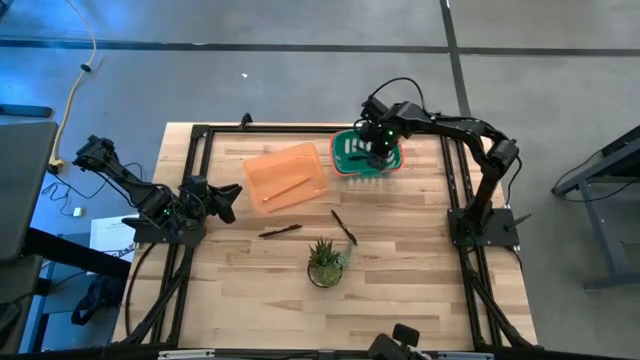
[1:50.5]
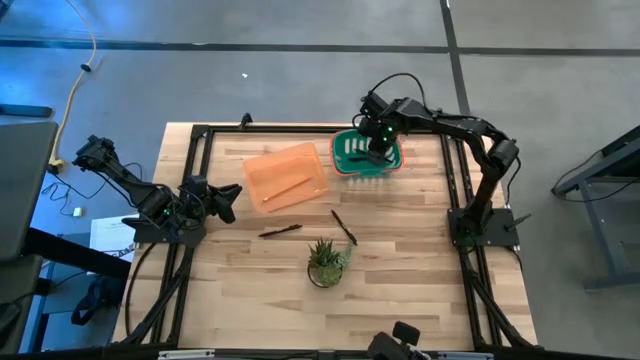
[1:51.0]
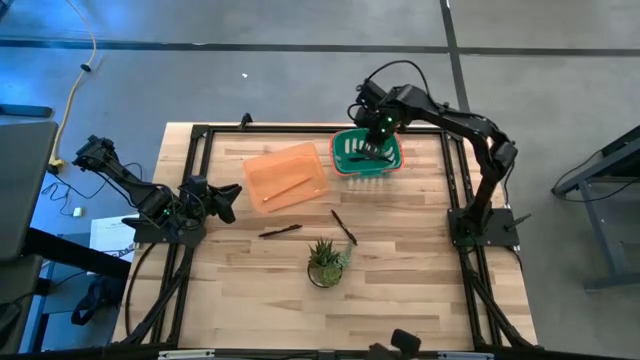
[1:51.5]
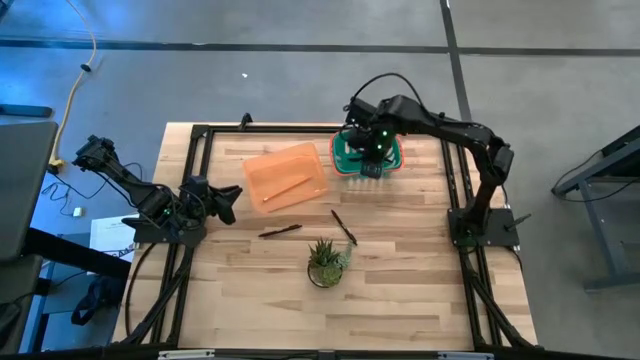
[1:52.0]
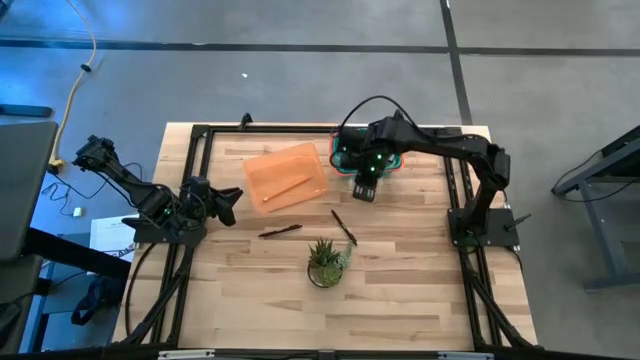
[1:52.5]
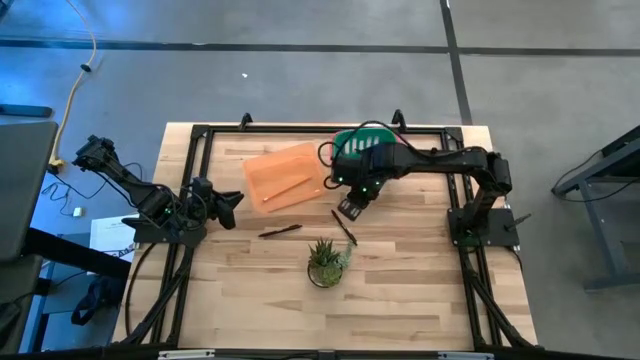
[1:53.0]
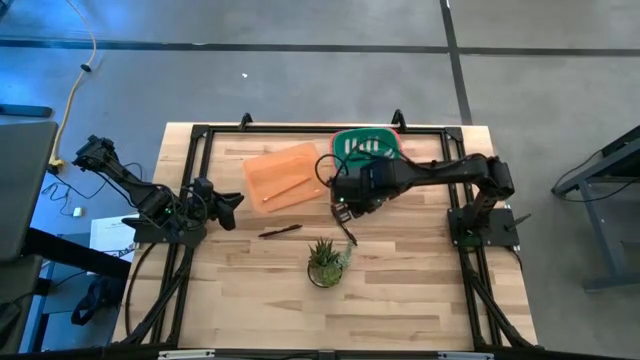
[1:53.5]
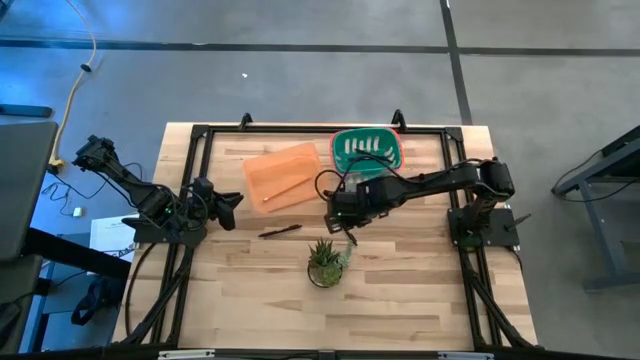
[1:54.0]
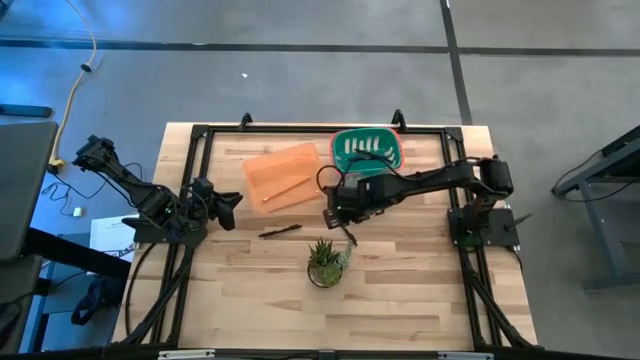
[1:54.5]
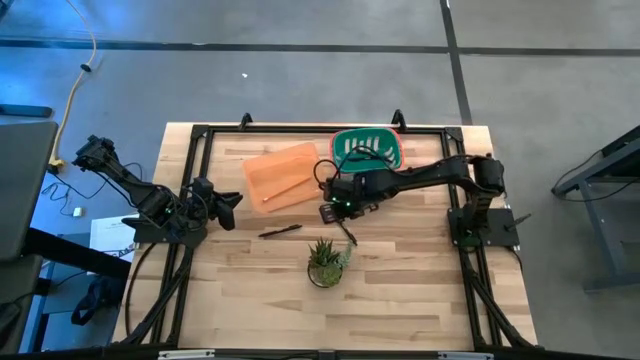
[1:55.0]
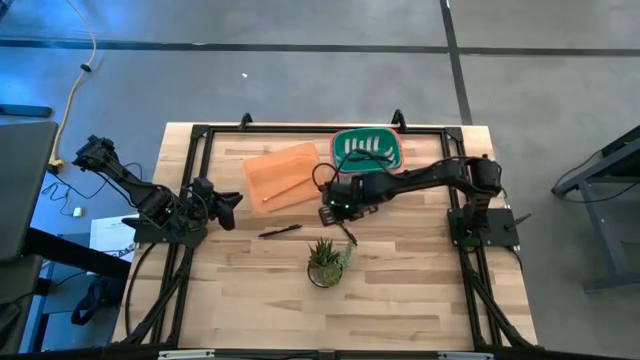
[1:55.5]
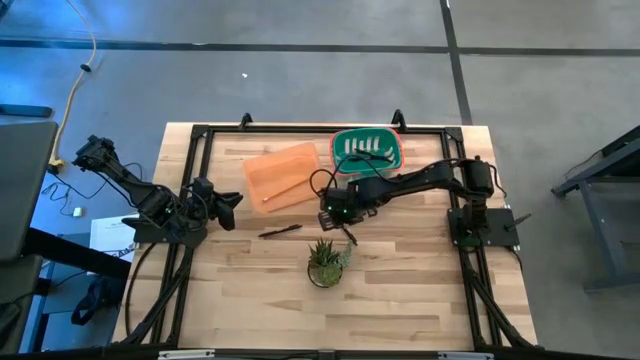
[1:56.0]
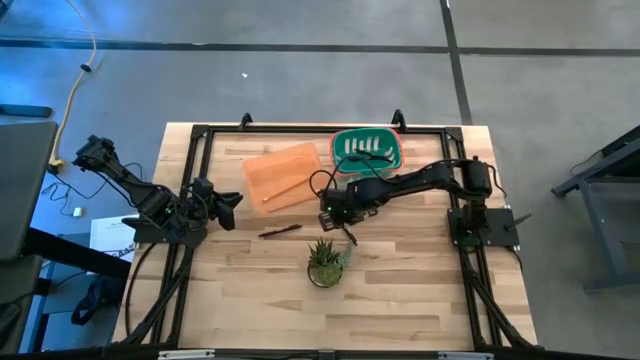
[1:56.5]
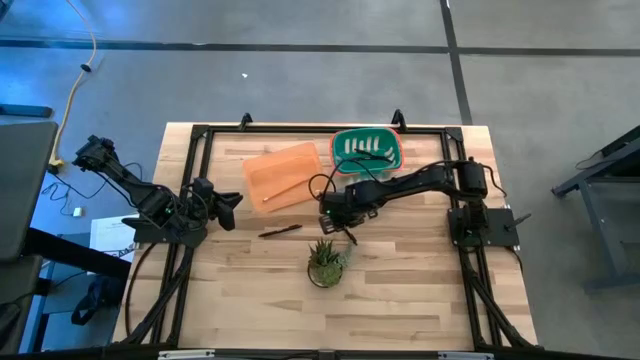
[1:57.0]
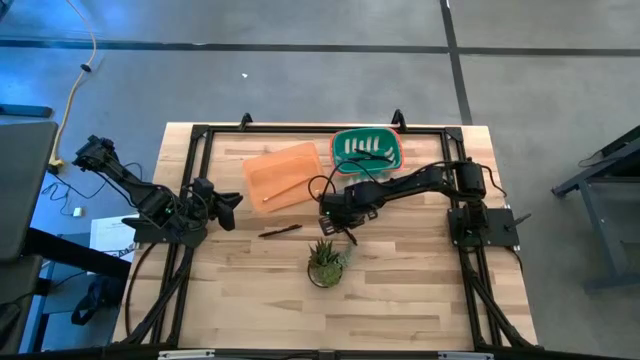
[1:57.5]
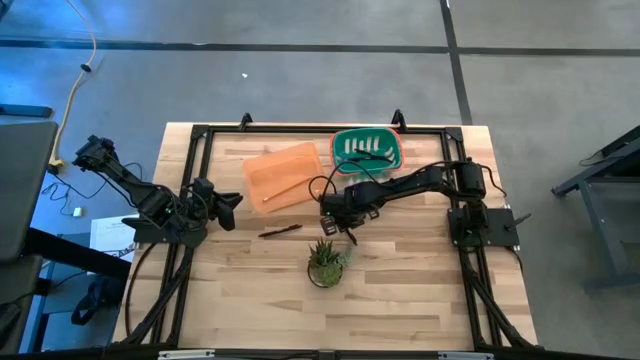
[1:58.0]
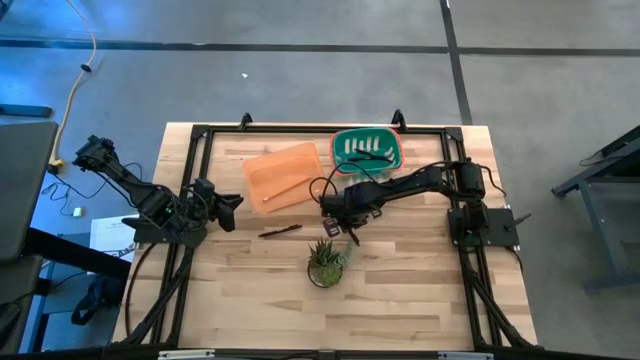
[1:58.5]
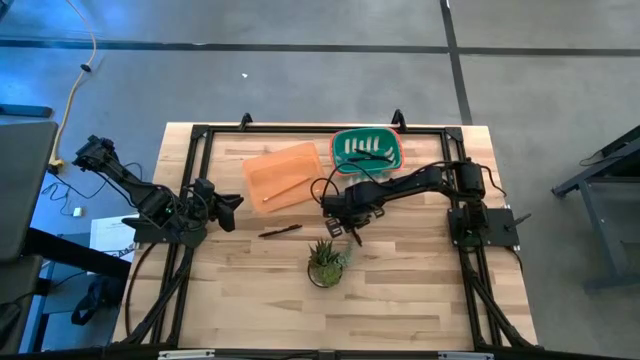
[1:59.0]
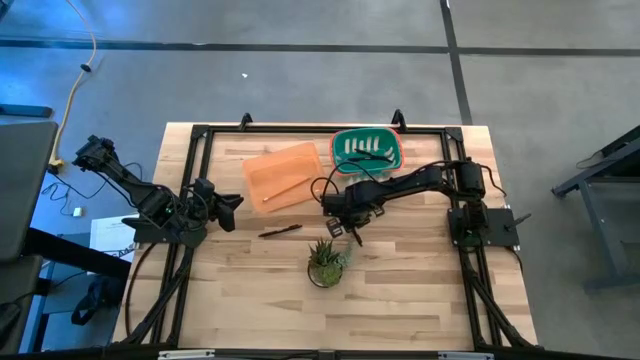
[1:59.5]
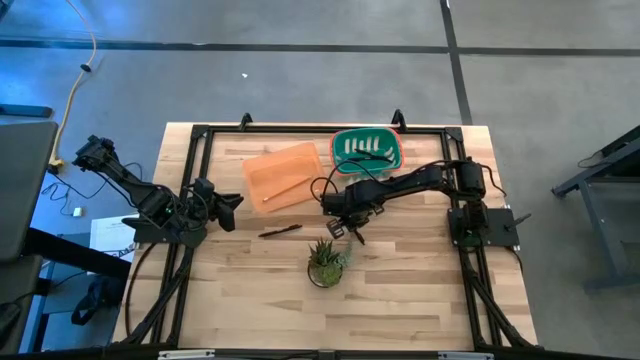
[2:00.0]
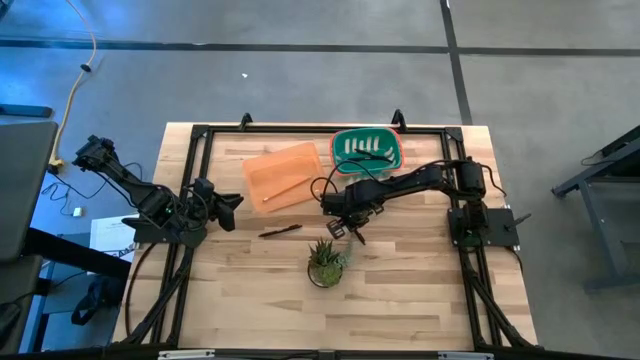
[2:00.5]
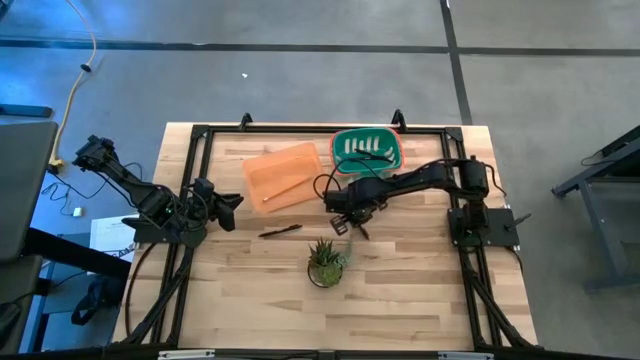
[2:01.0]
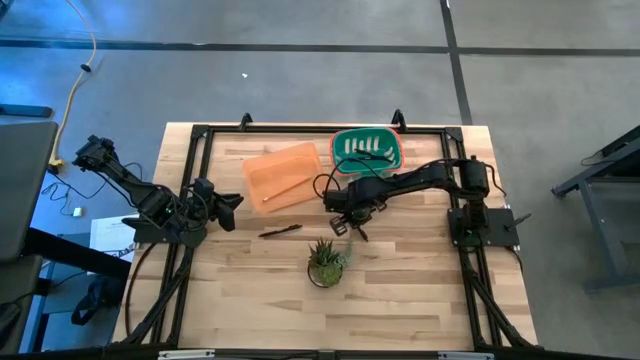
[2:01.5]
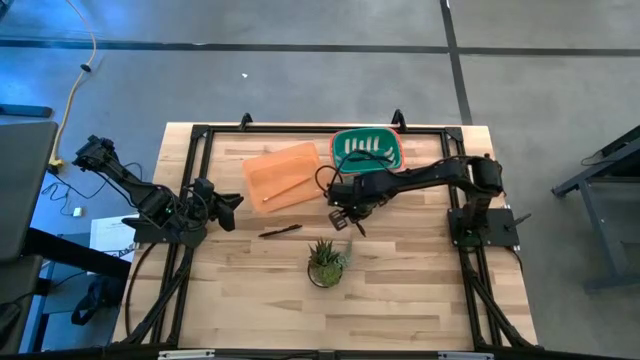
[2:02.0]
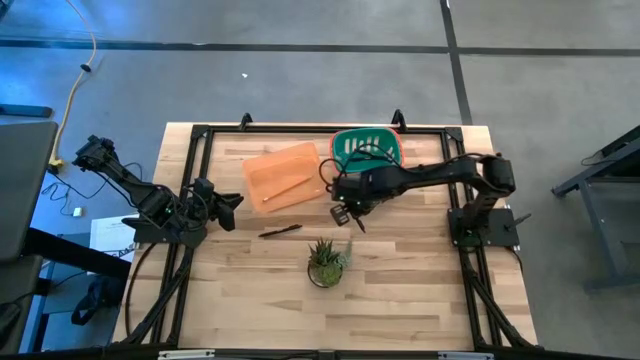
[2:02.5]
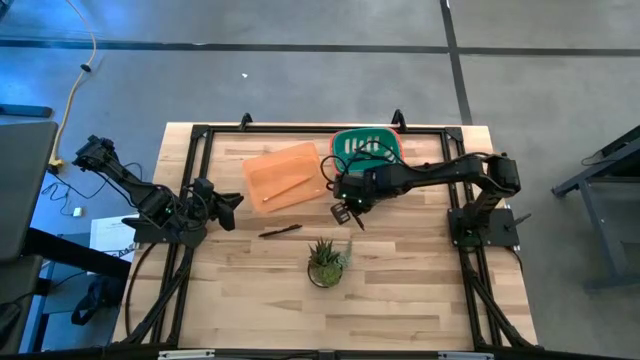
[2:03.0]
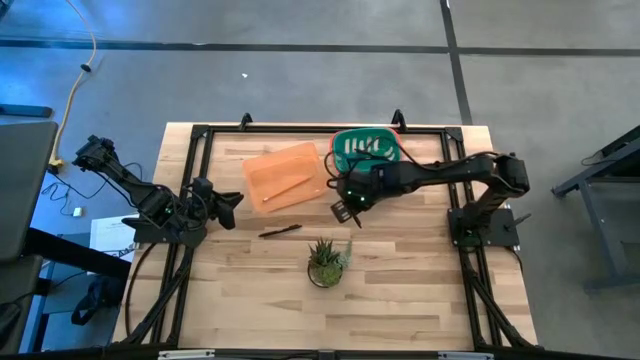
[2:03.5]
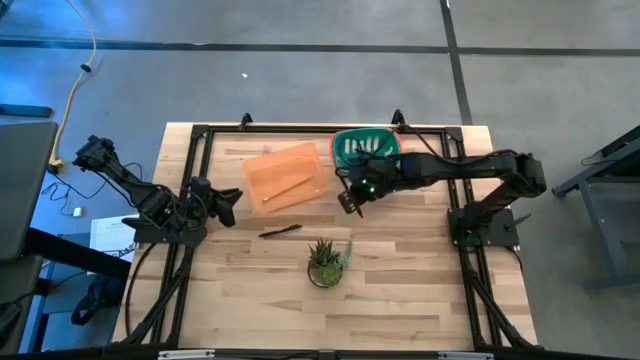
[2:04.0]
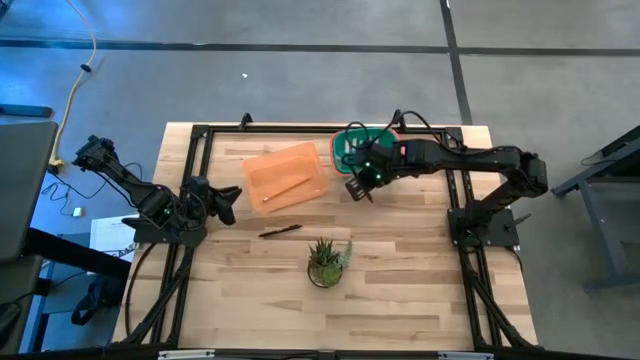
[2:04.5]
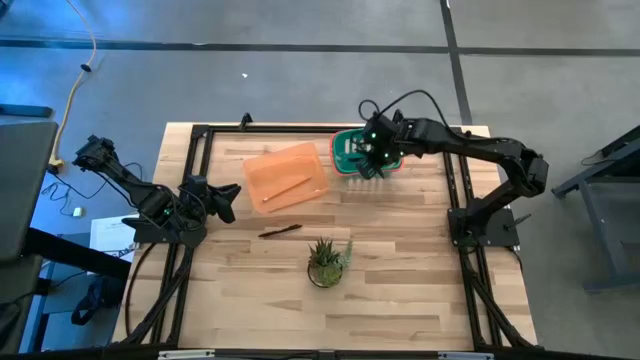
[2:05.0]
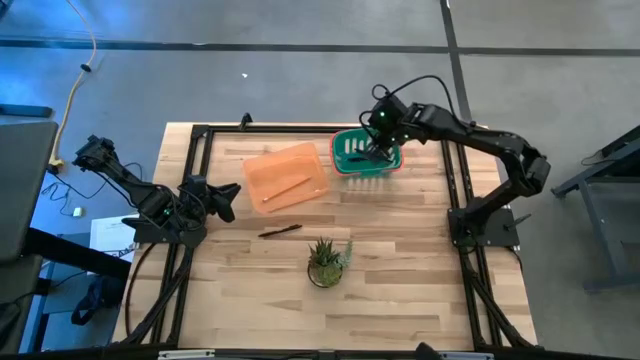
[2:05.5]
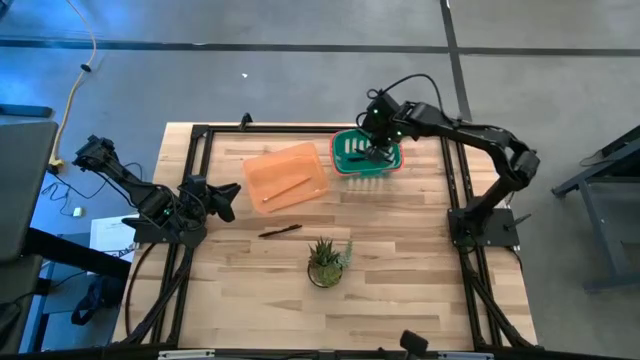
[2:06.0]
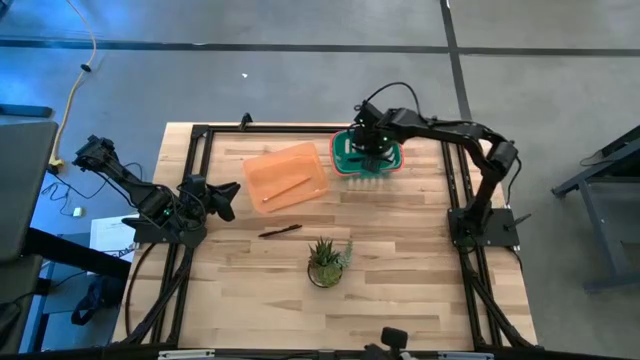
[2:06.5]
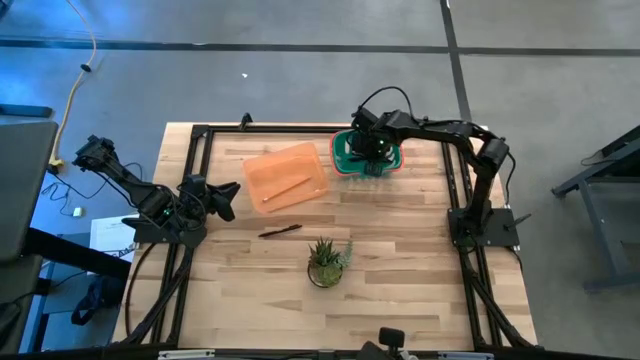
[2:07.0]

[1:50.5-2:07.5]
Task: Sort pens & pencils
Put the black pen into the green basket

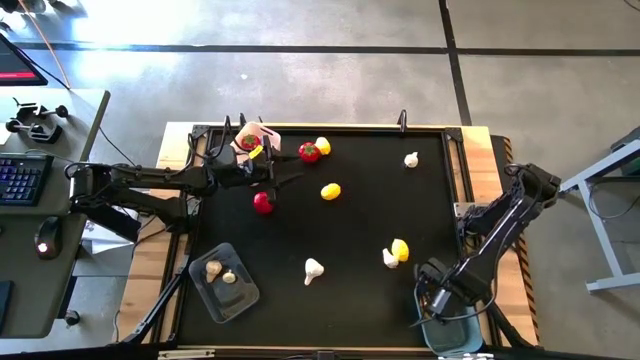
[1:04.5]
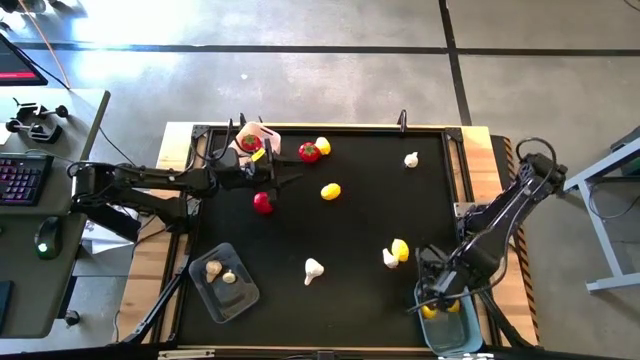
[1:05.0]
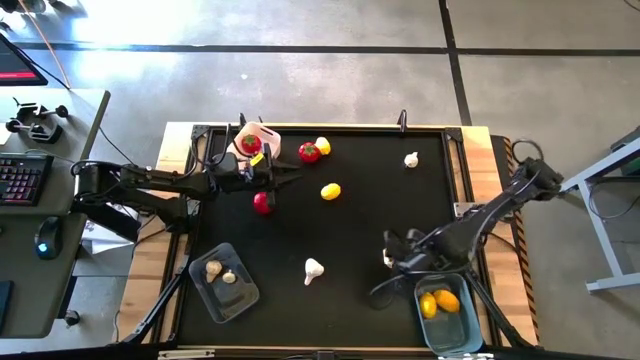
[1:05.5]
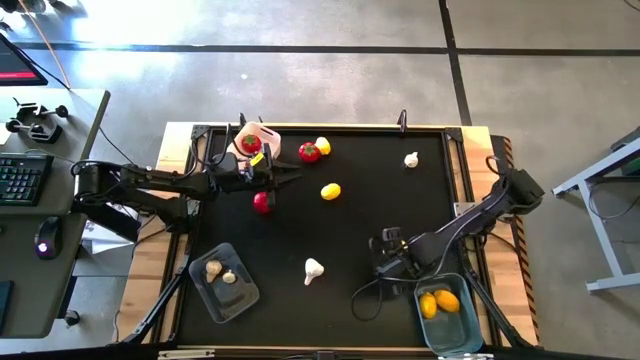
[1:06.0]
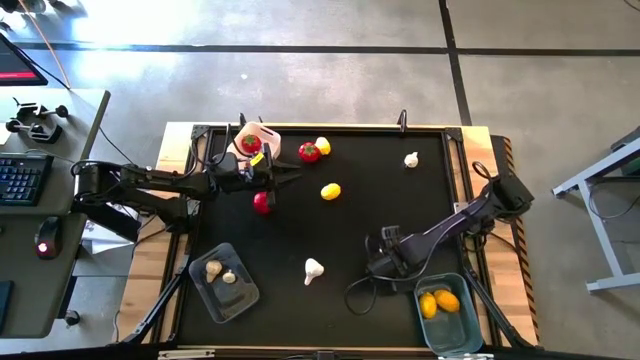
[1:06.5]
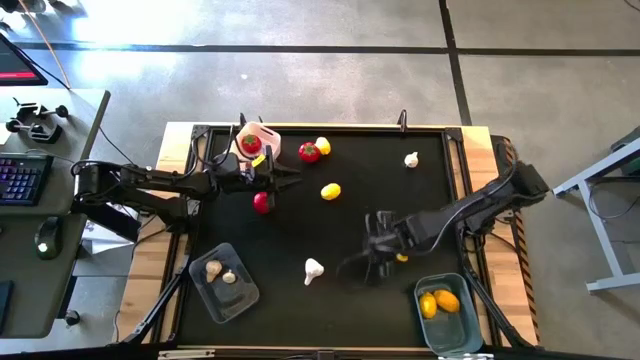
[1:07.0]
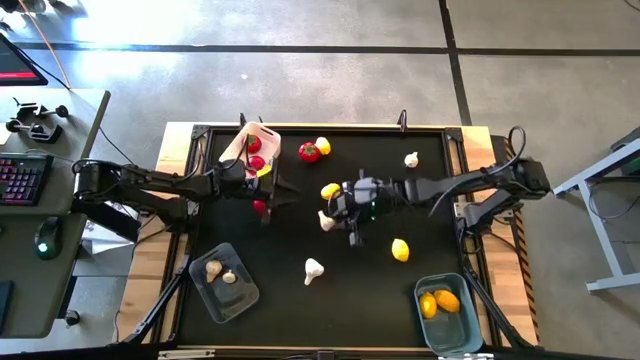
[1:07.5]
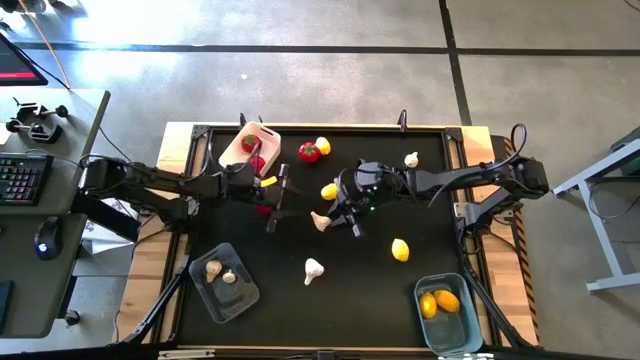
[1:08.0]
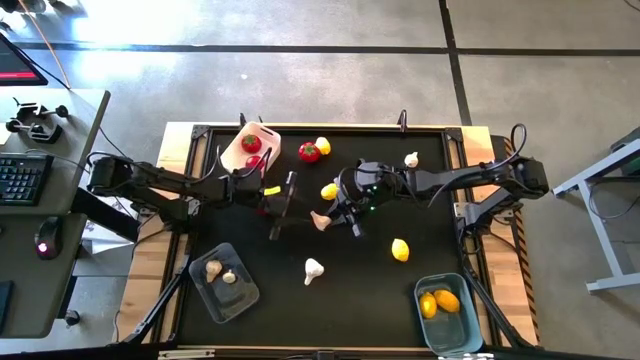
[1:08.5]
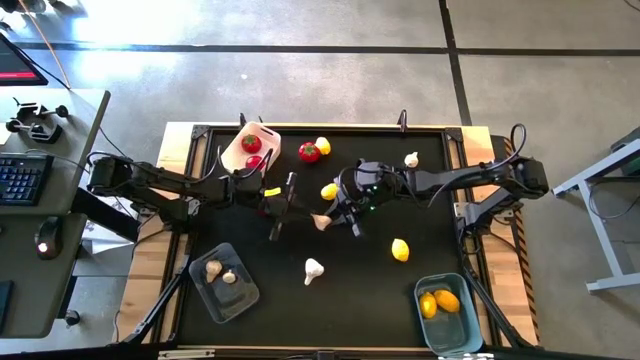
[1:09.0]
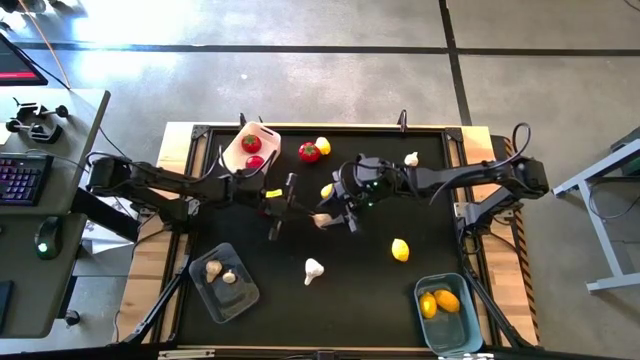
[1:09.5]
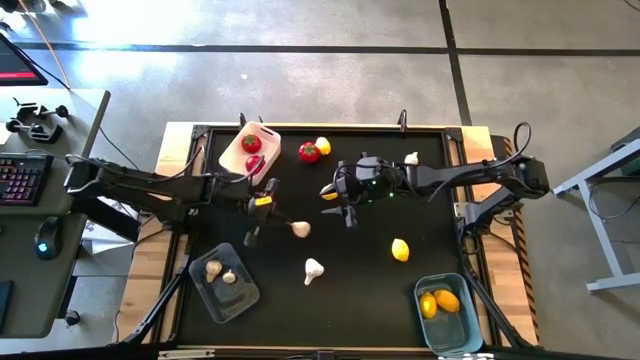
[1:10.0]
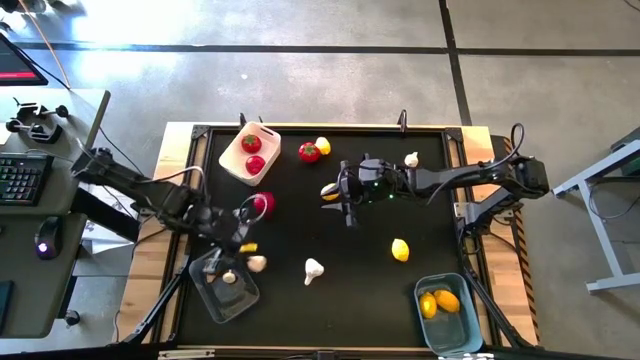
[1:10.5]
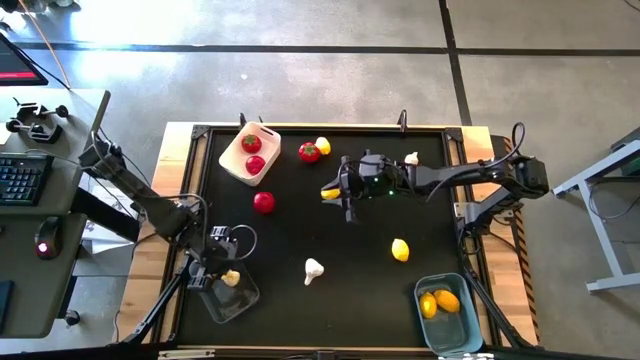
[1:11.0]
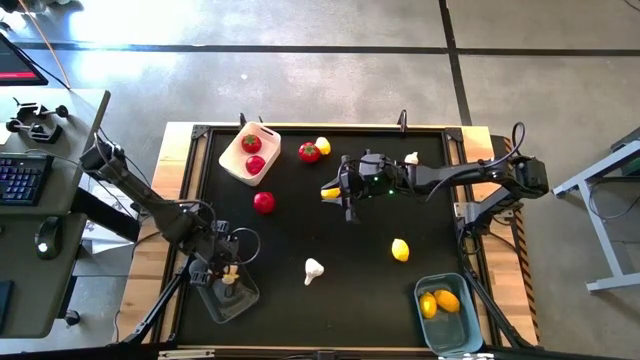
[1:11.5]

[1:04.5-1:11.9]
Task: Sort produce into baskets
Put the white garlic into the transparent bin
